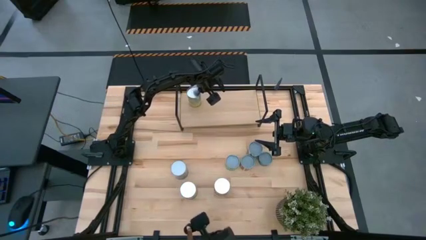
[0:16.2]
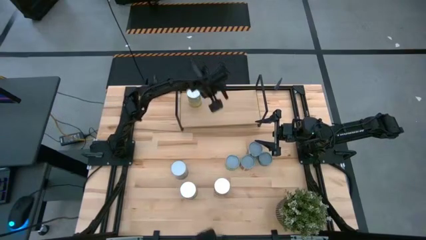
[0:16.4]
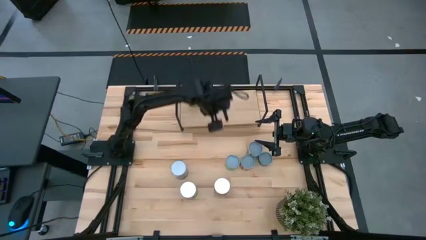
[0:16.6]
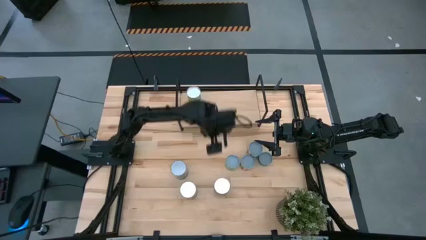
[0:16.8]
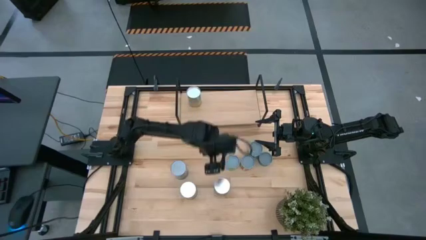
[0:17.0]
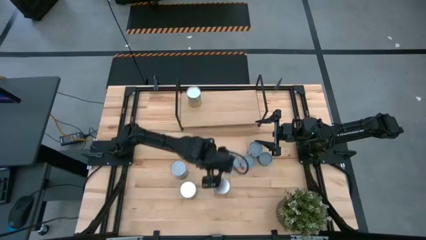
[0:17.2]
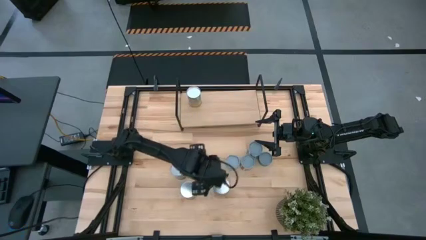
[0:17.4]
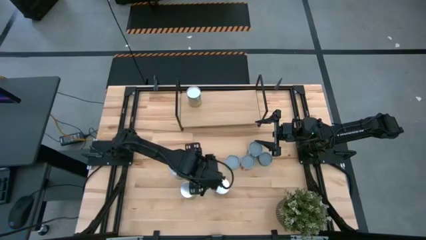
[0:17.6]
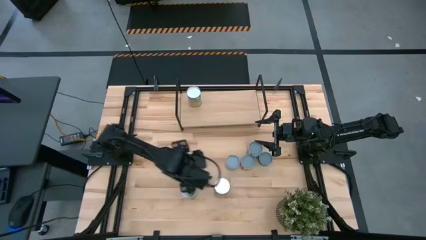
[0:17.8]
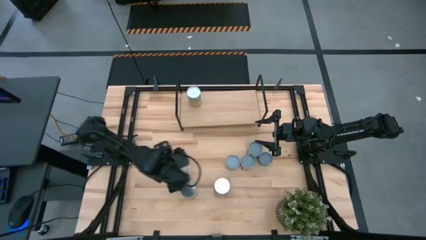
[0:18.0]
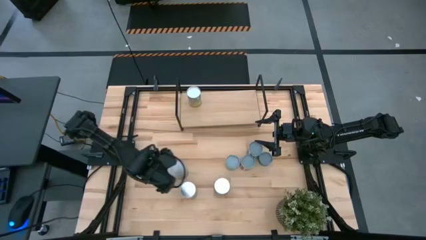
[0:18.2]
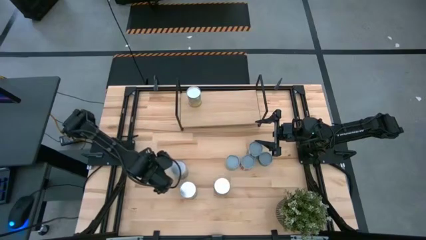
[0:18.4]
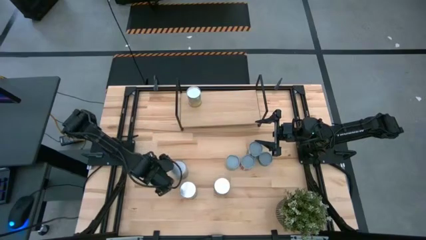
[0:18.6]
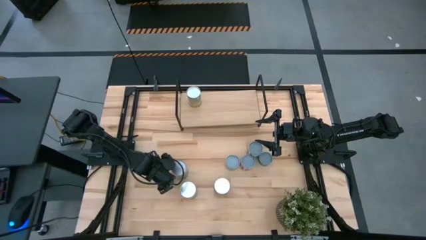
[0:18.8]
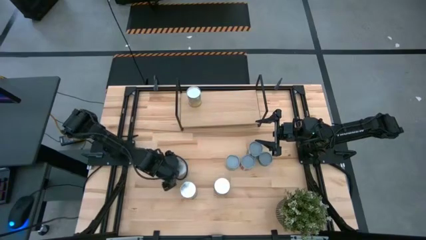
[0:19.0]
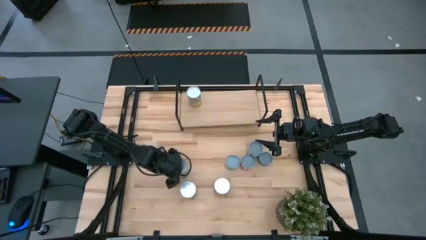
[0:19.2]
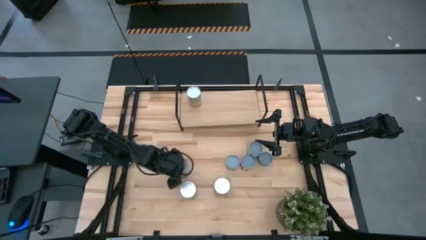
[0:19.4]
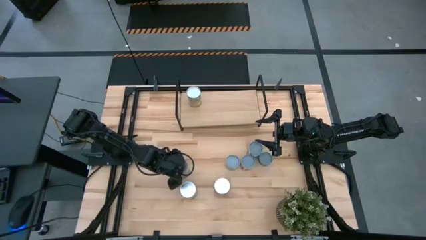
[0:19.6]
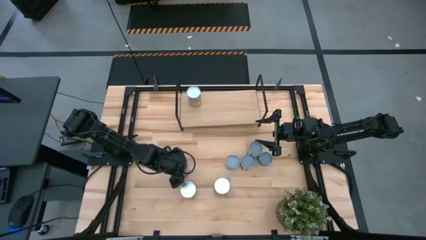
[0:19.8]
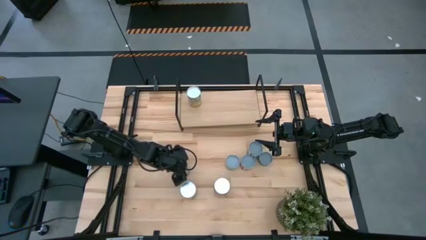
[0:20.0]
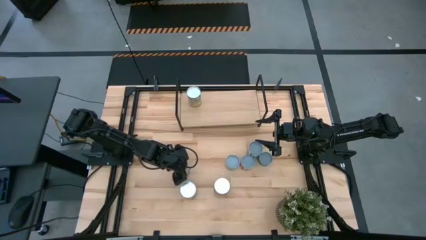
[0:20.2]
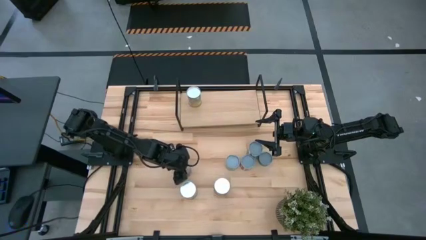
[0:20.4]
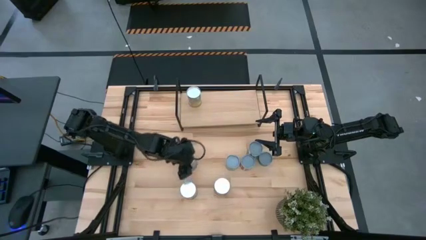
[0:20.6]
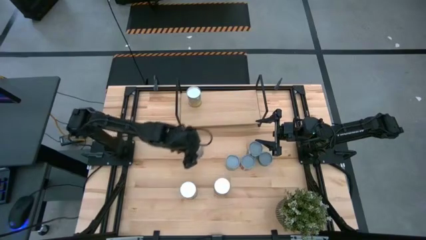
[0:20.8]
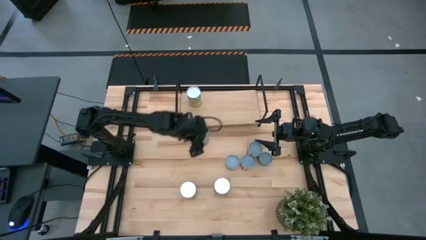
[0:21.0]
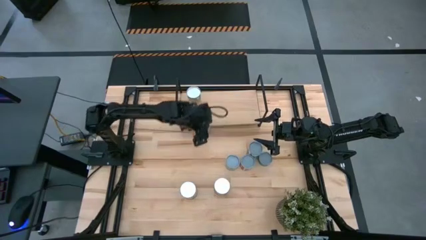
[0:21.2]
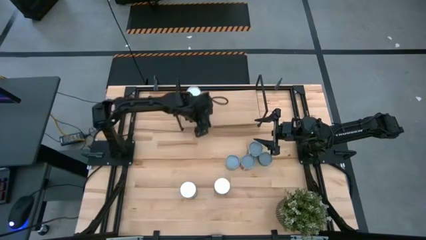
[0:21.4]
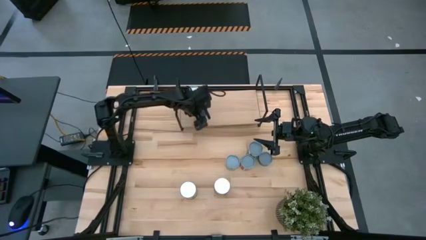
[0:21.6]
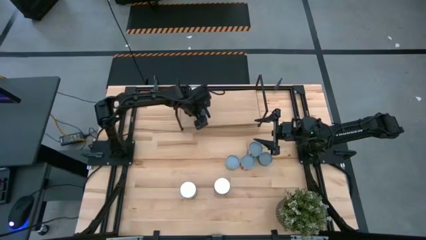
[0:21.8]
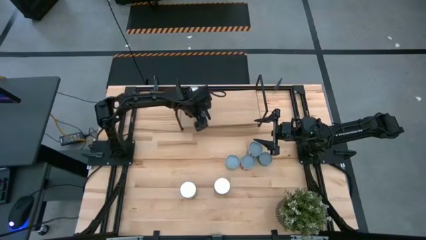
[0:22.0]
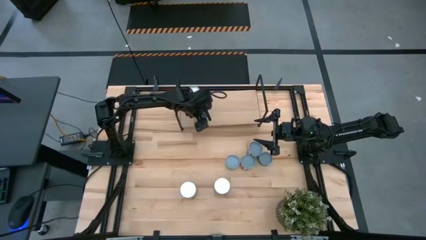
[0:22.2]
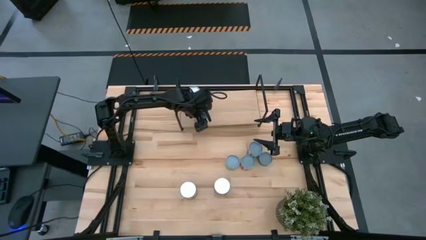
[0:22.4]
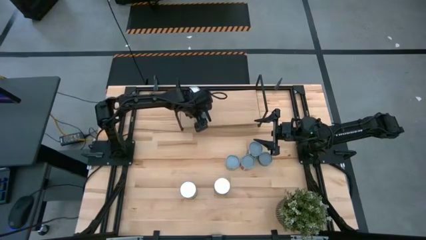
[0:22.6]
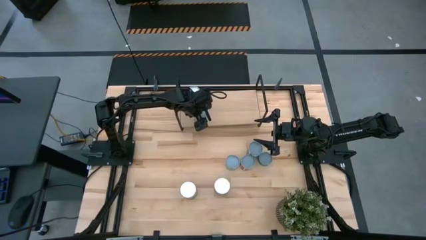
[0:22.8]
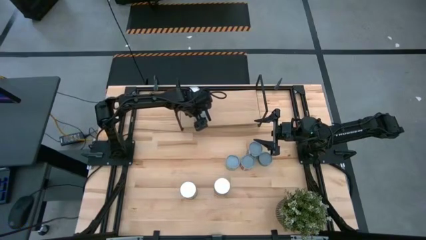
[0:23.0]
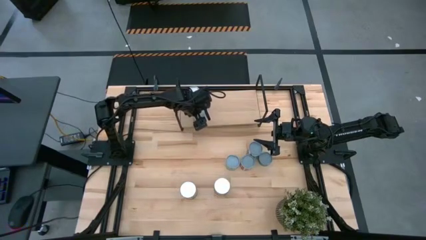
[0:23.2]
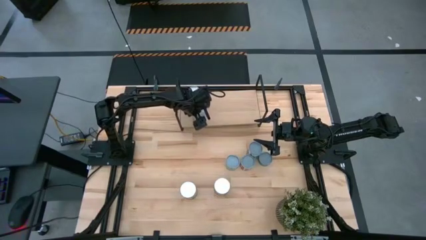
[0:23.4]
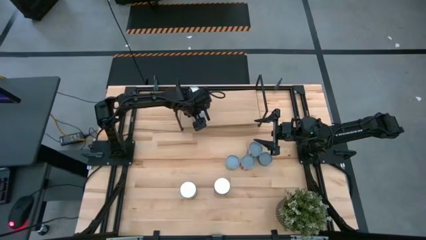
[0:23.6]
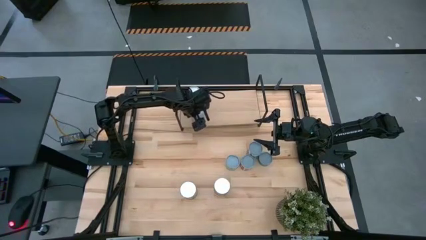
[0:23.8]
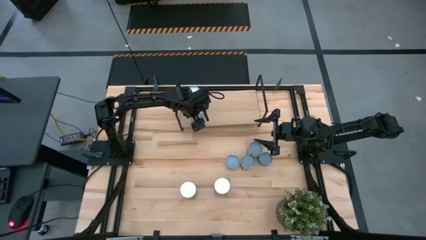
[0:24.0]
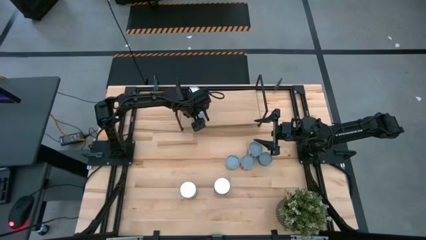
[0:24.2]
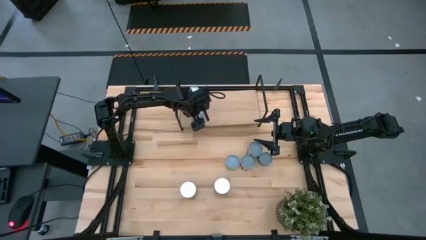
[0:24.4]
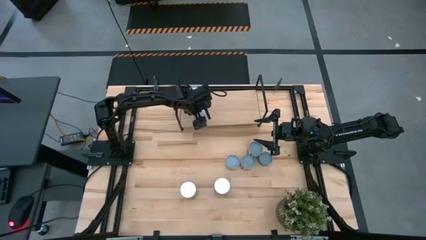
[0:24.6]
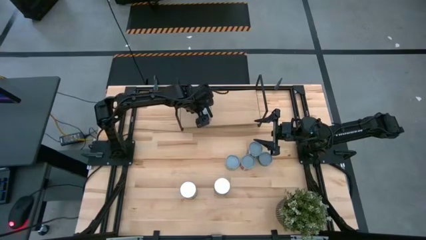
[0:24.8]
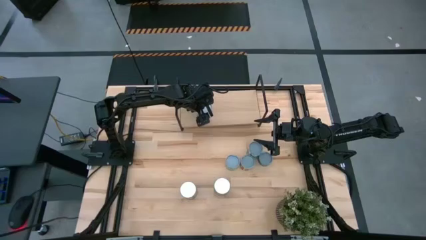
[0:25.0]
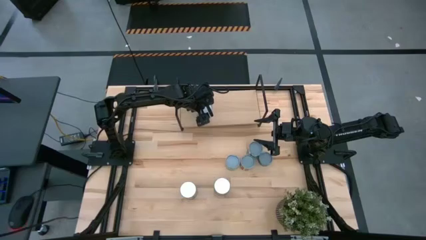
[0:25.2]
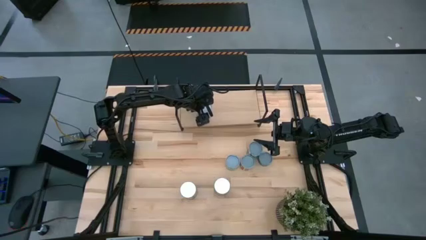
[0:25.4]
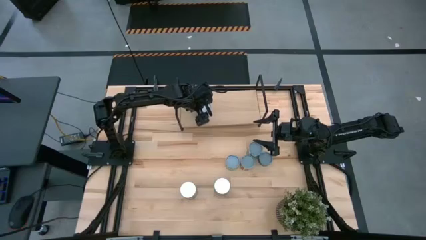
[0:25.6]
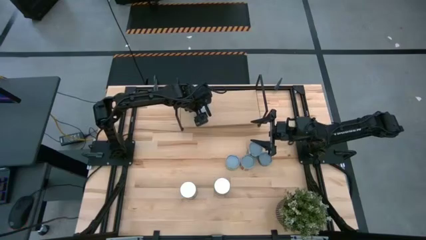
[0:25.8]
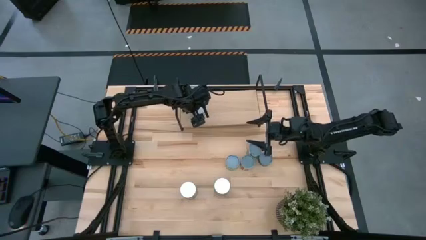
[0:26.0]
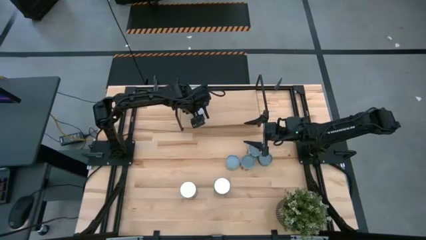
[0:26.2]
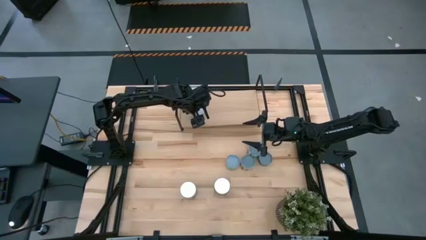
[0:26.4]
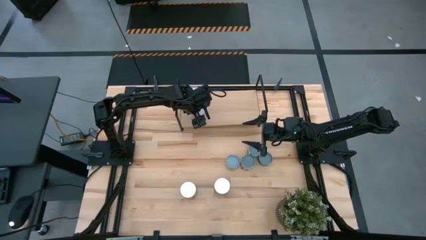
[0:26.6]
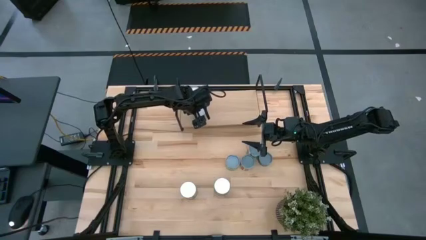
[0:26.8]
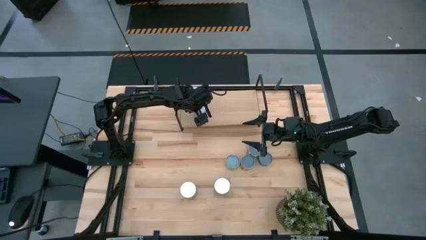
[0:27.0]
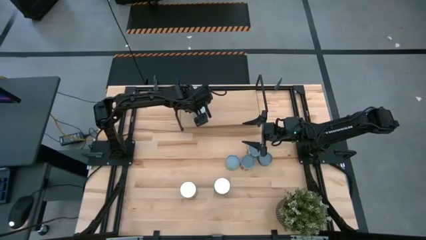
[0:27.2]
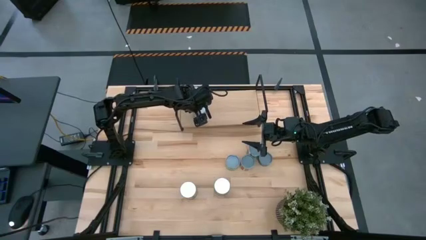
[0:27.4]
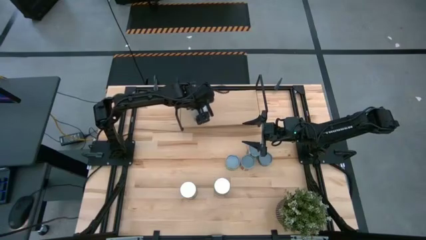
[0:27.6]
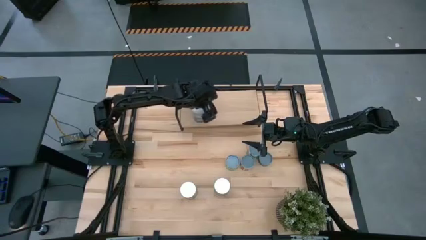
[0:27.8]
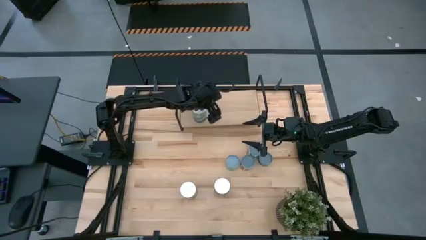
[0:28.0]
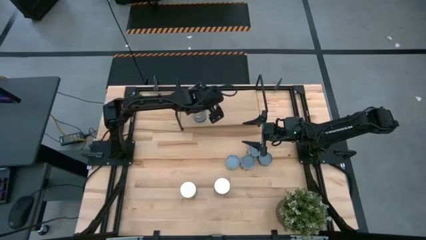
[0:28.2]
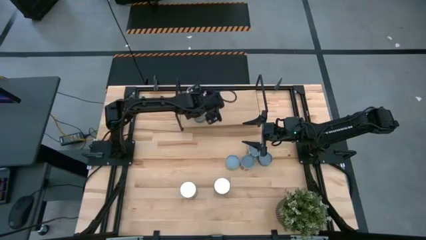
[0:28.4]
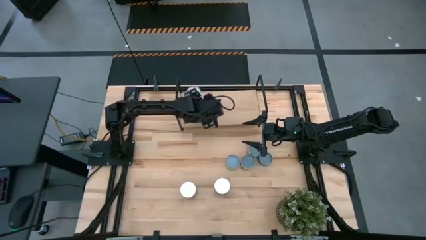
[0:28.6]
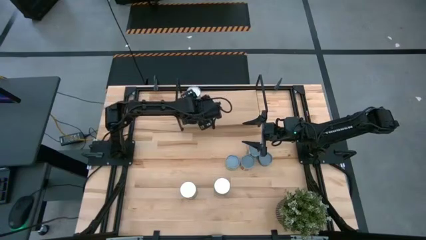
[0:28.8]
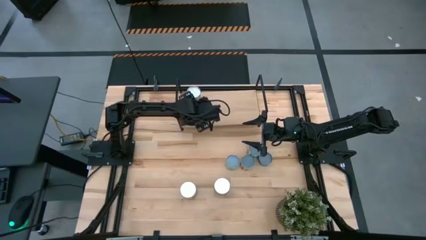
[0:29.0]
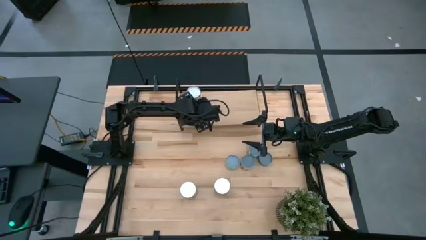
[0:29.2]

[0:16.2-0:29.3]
Task: Pick and place cans onto a shelf
Put the canned peas on the shelf

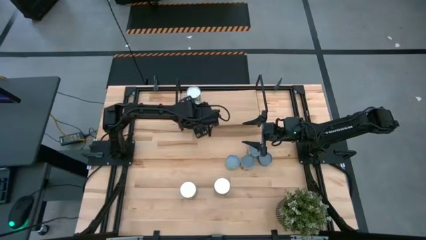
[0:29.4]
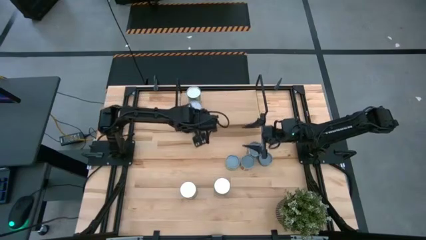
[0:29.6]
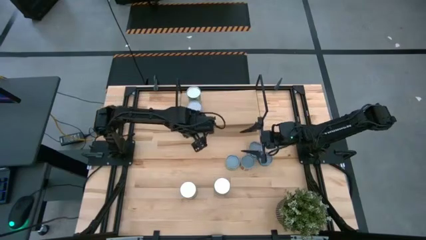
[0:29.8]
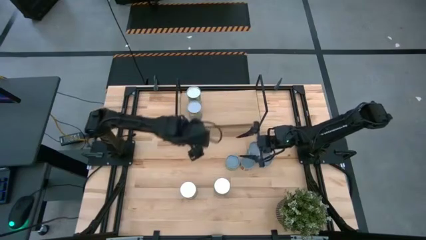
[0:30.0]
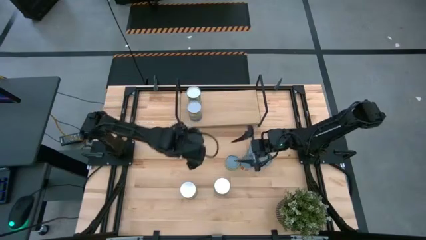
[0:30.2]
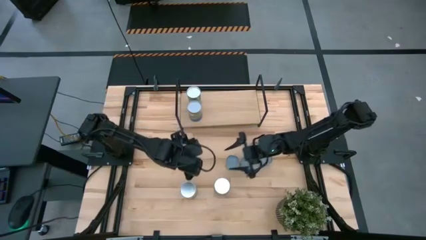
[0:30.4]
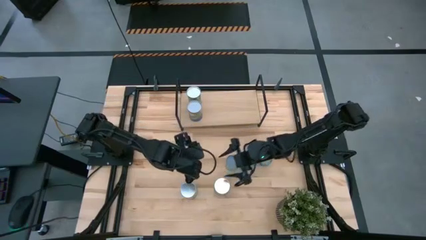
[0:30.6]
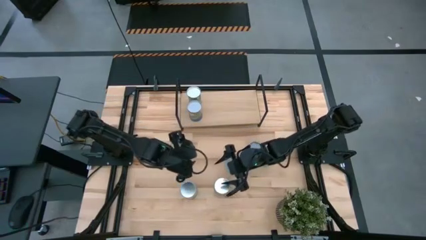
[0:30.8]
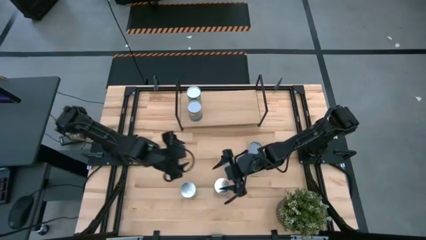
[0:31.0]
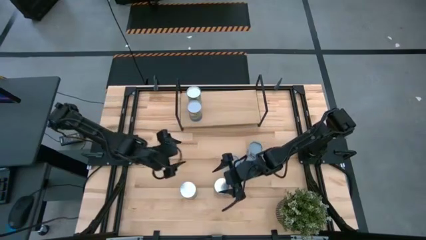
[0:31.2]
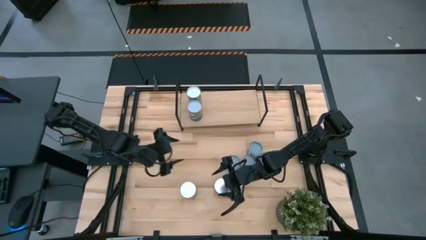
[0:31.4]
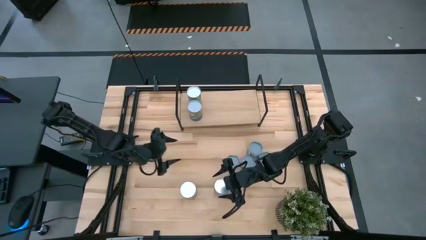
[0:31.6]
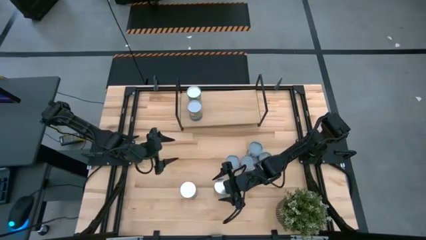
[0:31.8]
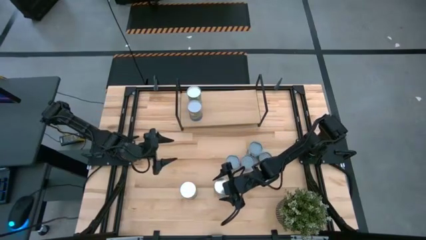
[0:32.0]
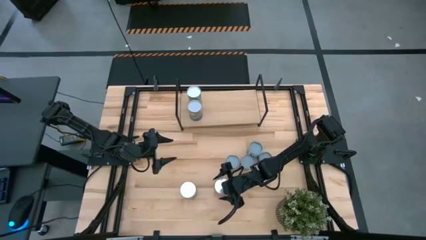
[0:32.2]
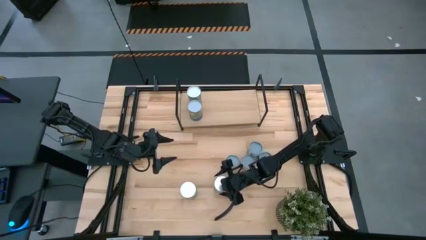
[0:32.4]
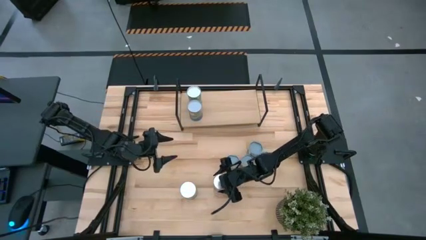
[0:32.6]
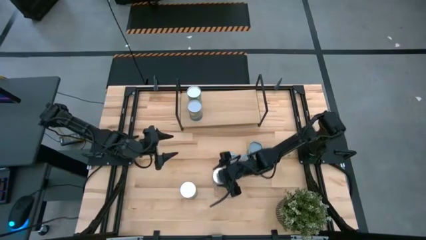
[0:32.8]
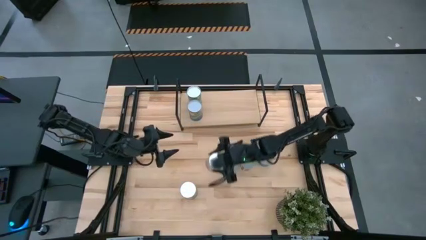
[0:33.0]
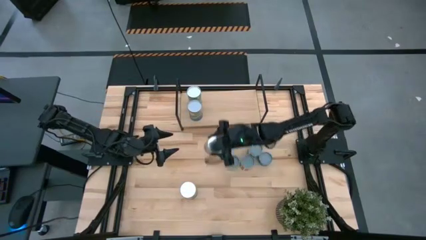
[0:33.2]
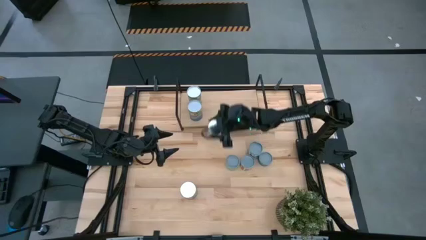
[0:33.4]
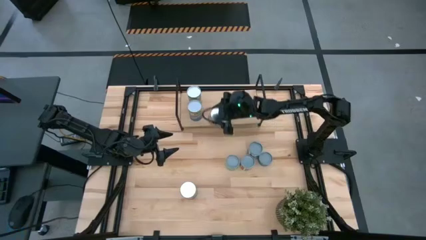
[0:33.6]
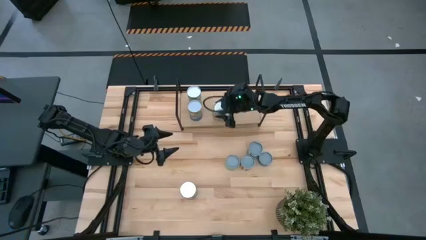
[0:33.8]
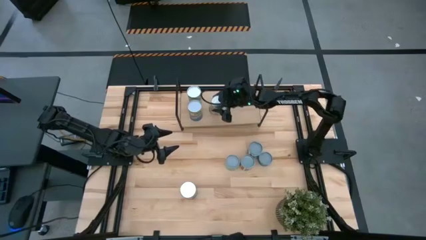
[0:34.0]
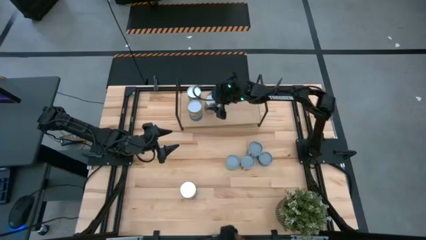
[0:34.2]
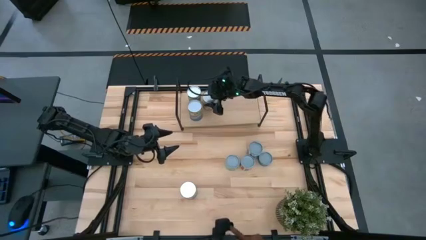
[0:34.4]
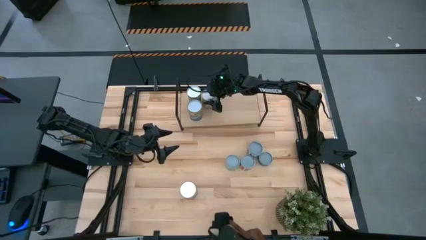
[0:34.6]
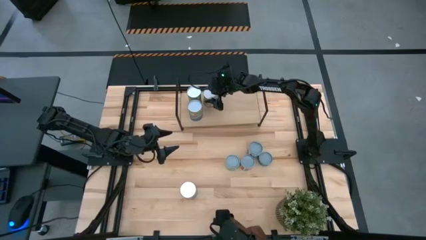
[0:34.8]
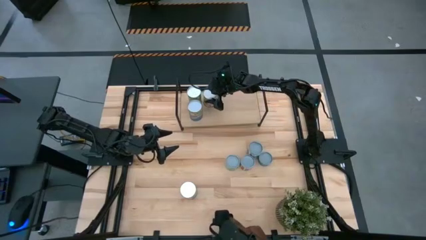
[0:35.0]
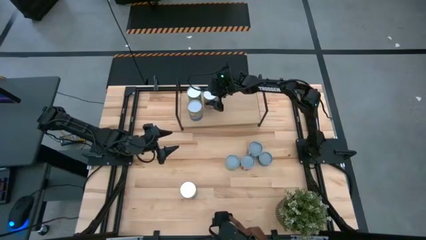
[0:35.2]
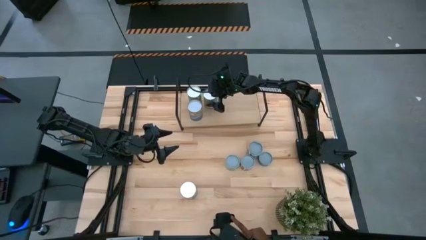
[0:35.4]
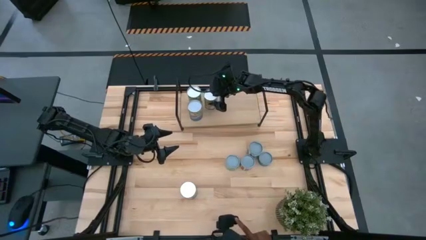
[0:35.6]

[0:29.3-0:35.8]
Put the canned peaches on the shelf
